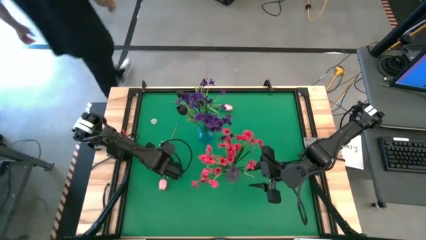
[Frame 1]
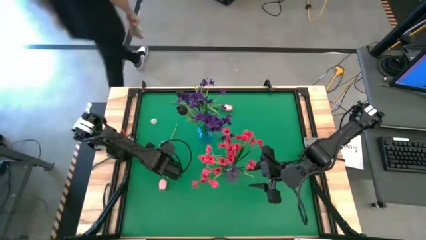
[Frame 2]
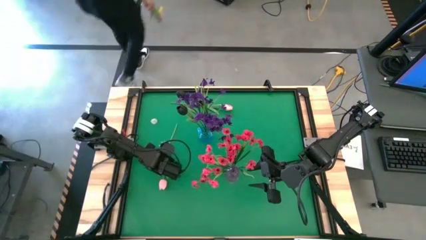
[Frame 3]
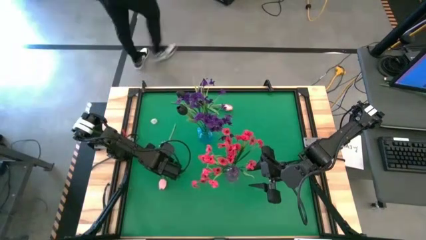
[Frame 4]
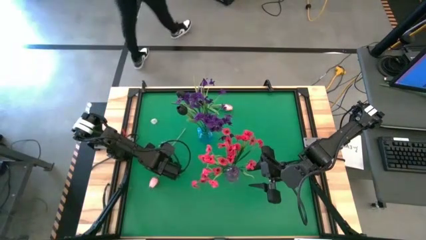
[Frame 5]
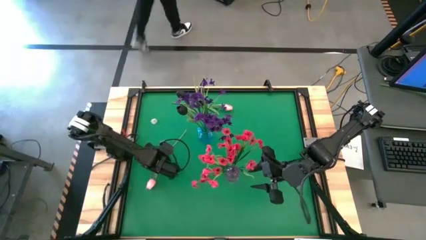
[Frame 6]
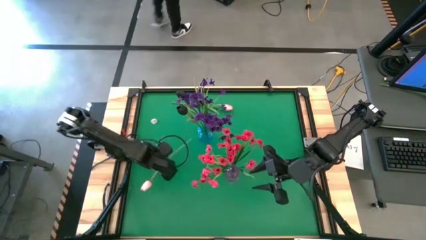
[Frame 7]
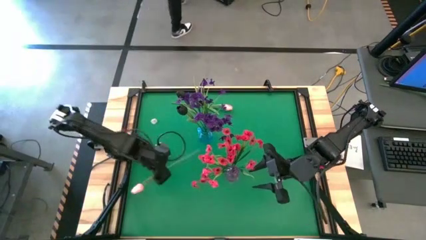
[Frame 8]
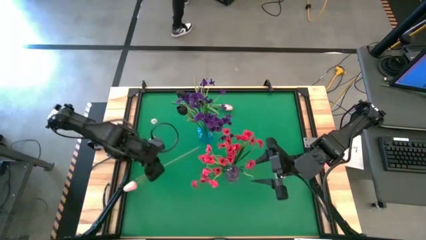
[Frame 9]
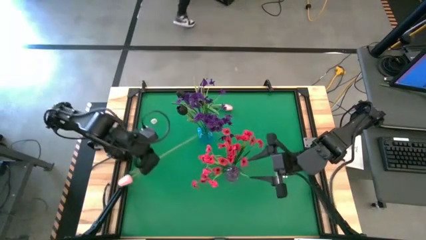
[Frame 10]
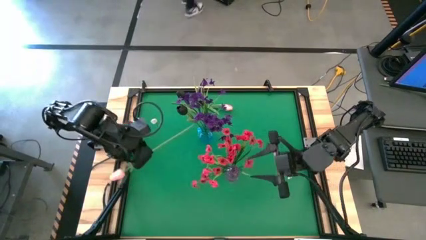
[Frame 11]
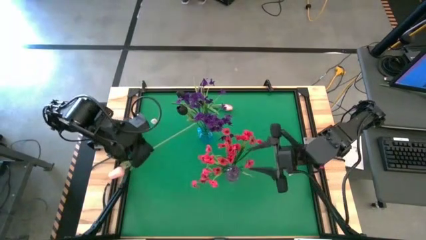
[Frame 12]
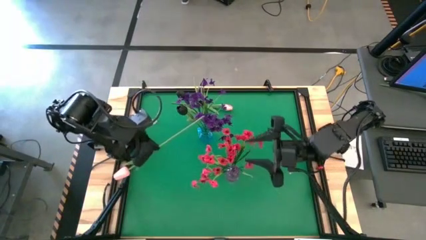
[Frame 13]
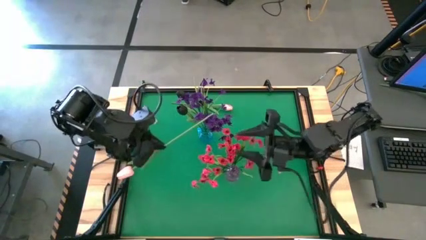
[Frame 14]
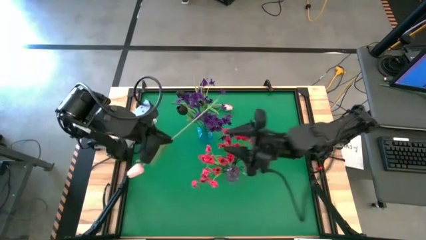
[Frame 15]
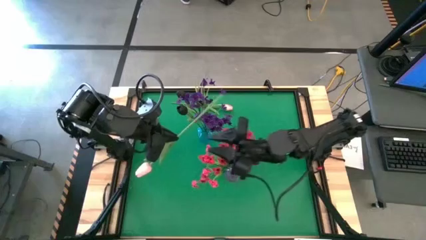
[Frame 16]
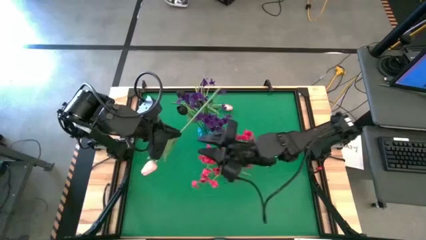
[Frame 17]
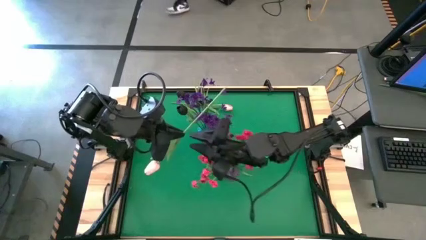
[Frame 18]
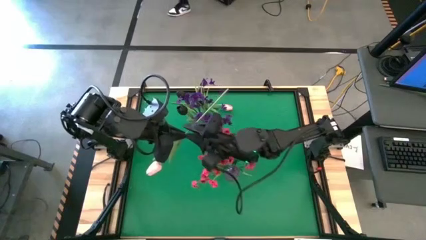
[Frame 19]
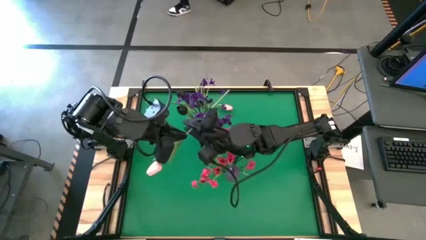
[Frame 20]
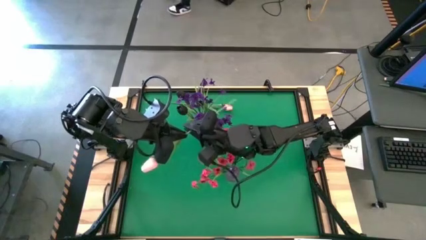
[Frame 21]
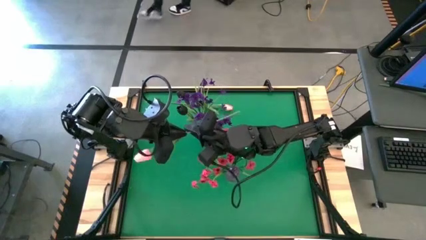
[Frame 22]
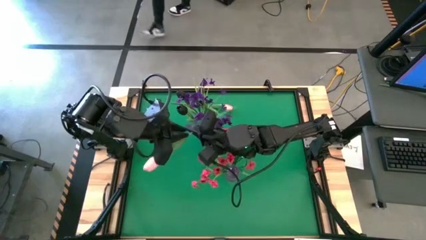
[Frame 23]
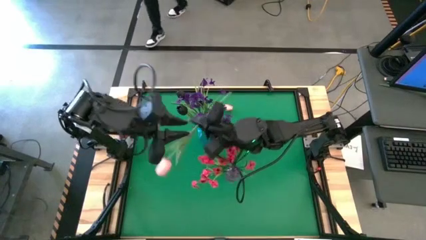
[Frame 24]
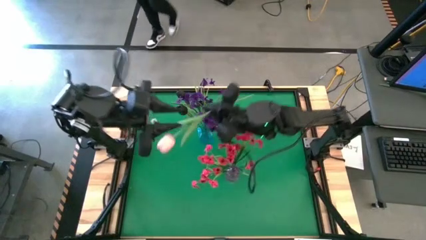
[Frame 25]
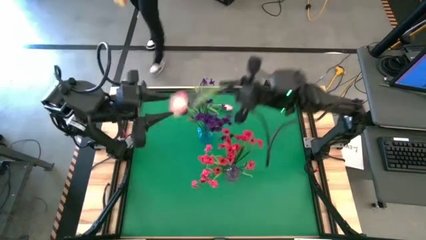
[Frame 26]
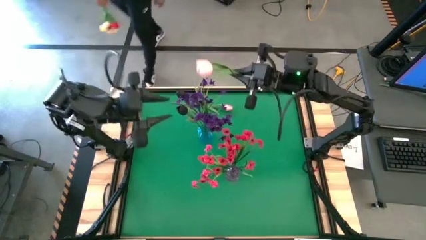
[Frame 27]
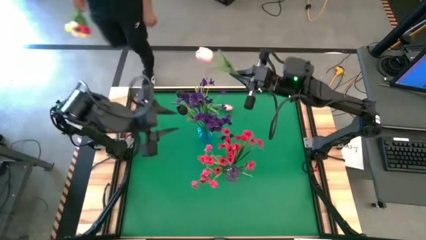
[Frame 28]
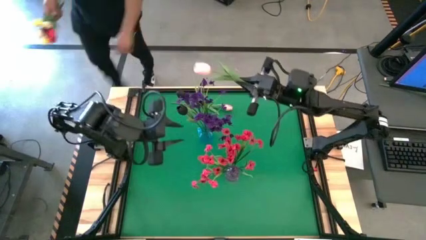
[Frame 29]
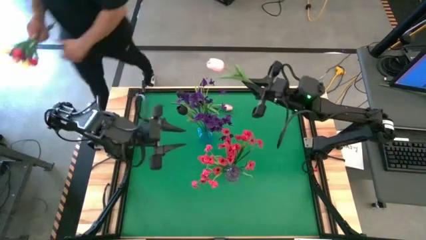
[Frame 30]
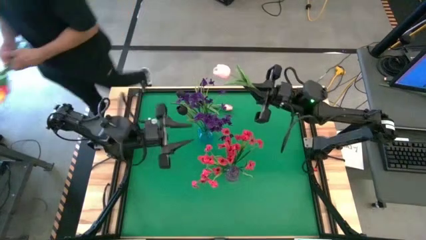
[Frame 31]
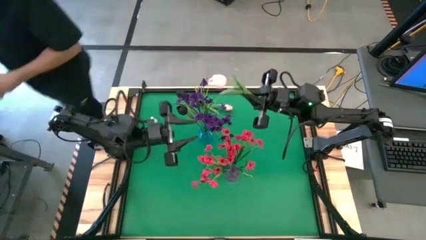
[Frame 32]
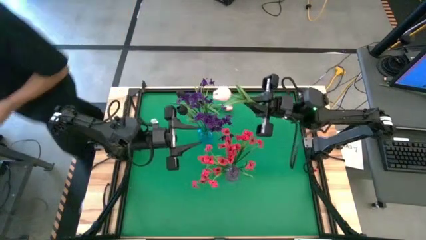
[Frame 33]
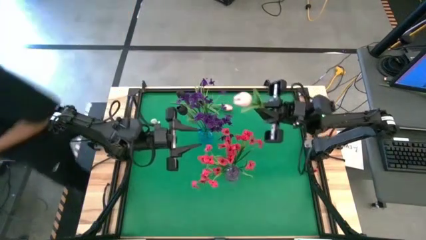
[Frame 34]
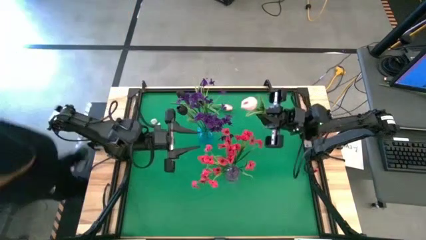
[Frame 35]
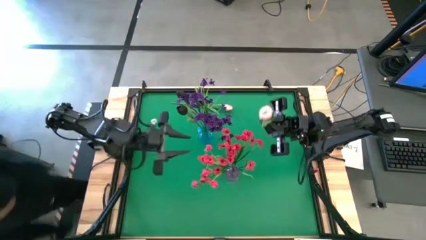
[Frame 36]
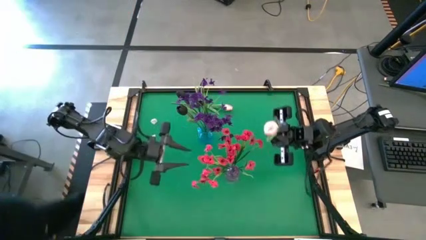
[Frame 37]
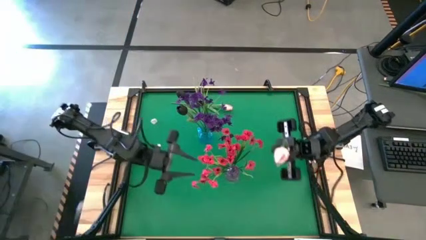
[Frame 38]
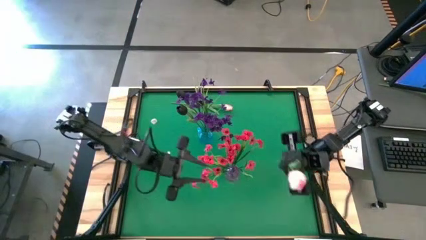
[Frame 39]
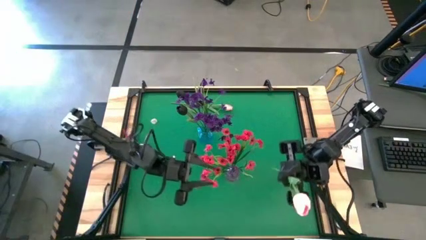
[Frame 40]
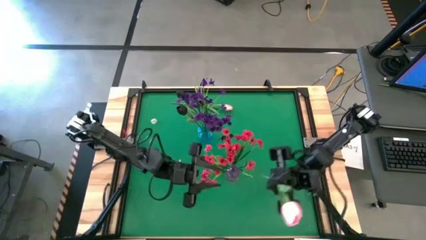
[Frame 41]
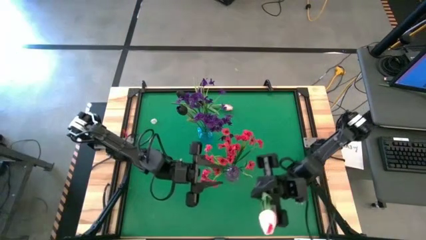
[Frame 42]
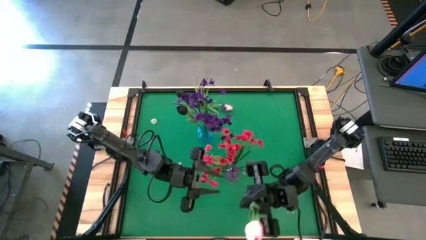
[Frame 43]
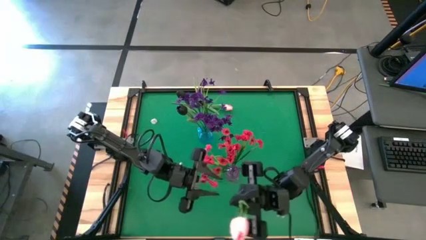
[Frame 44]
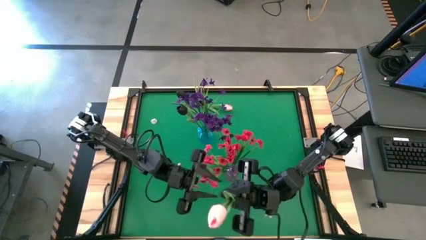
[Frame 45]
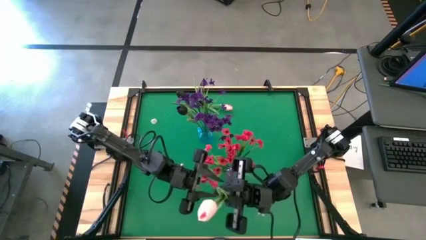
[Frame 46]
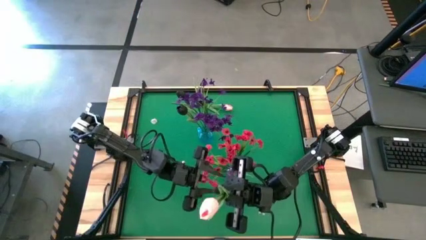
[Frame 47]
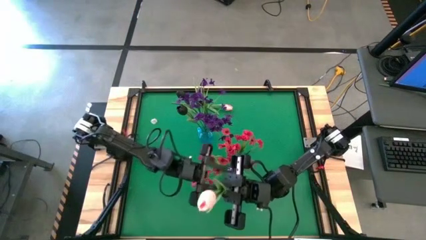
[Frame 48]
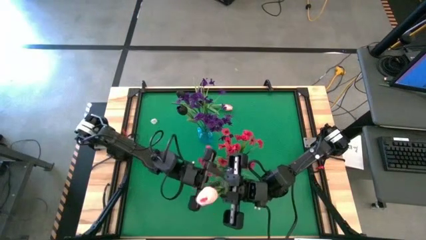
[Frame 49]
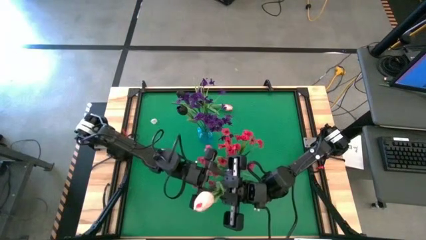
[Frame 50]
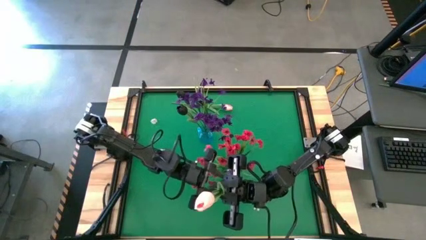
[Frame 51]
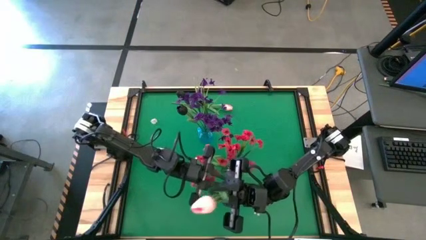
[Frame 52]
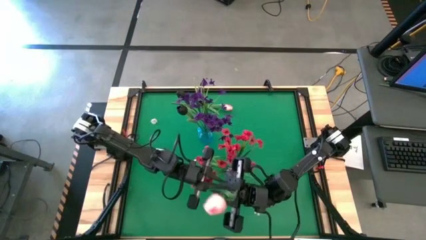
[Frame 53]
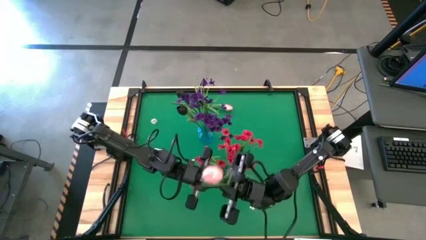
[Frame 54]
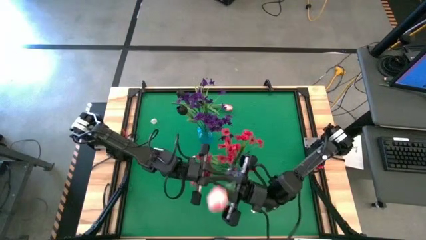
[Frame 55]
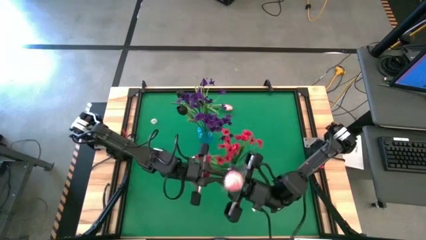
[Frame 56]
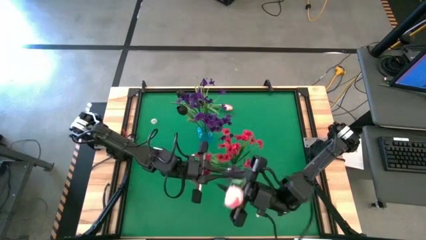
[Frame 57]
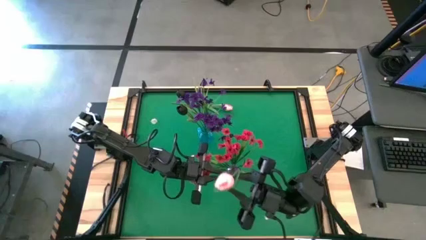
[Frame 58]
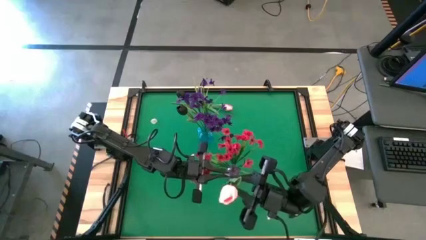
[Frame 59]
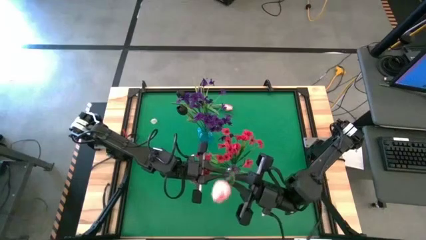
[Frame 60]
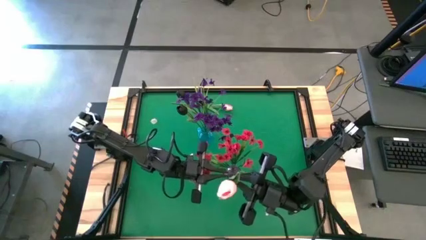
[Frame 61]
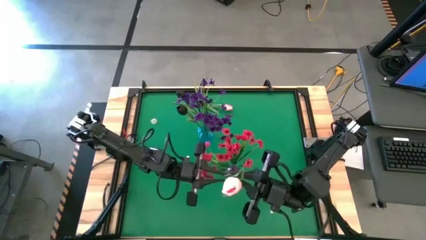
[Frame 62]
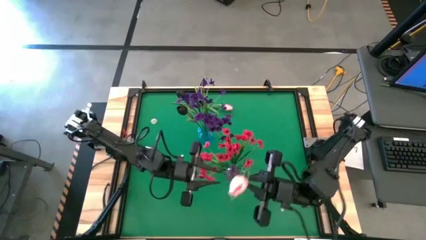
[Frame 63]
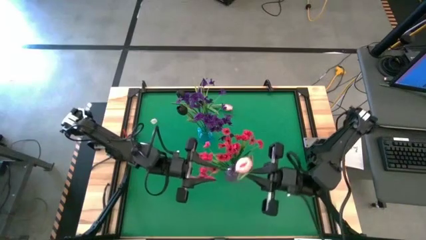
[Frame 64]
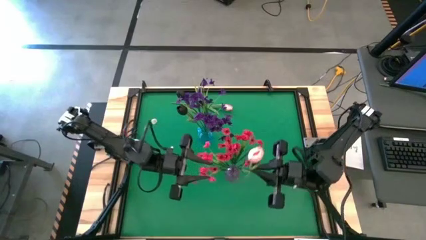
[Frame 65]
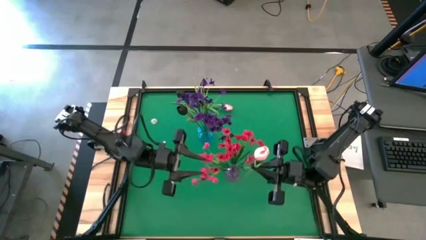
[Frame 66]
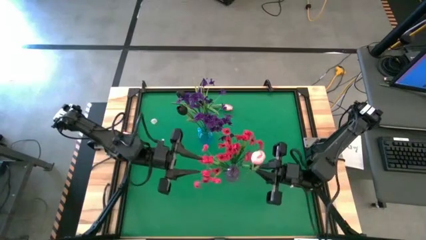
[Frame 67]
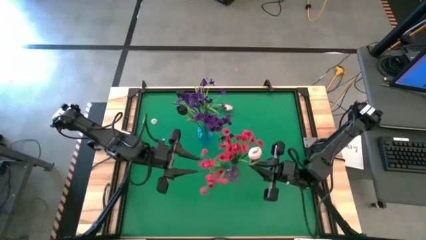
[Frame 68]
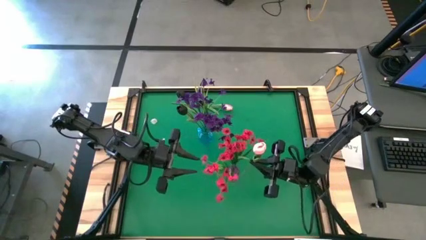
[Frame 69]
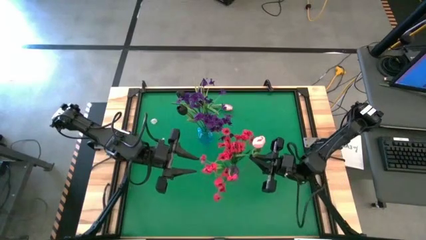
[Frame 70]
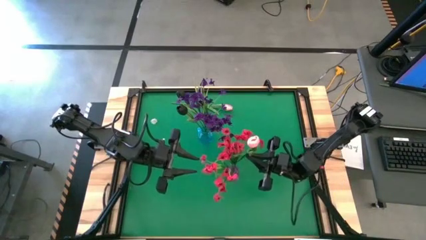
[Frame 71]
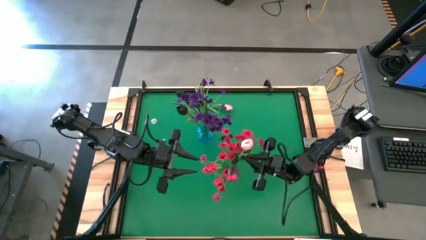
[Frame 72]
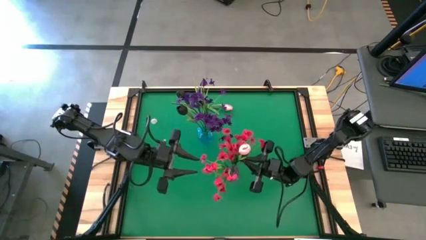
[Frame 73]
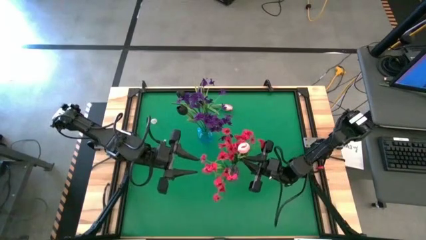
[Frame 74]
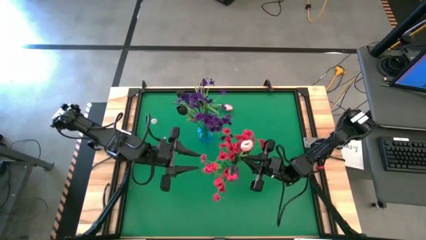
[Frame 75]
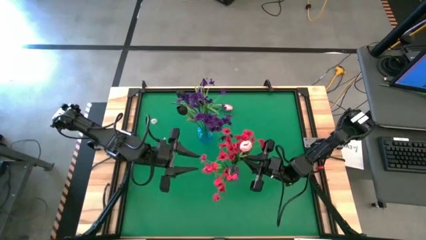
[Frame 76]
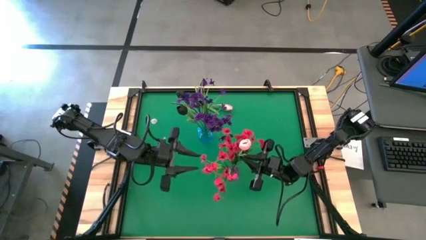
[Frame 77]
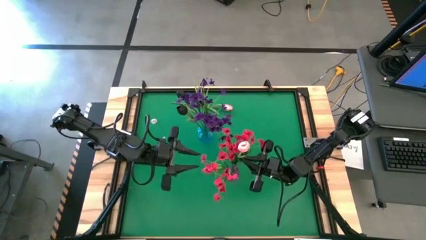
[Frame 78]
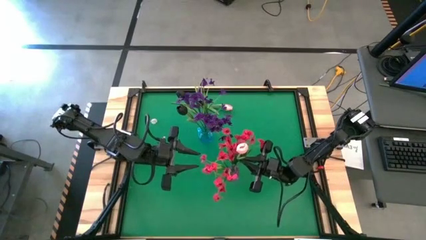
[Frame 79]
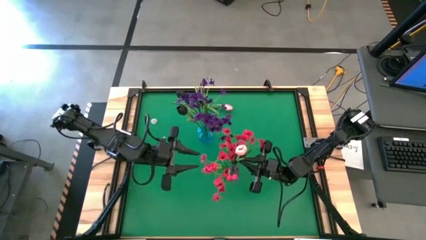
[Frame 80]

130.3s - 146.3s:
Task: Sort flowers into vase by color
Put the bottom pink tulip into the purple vase

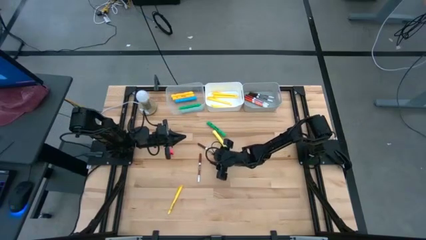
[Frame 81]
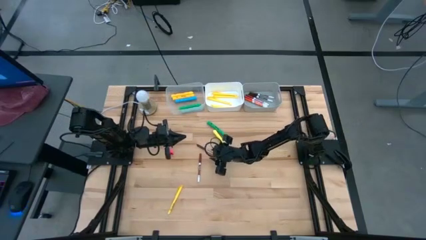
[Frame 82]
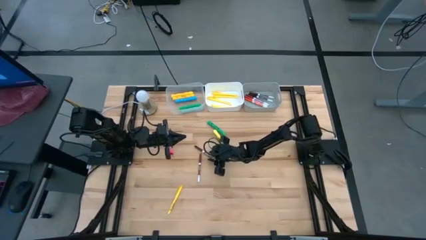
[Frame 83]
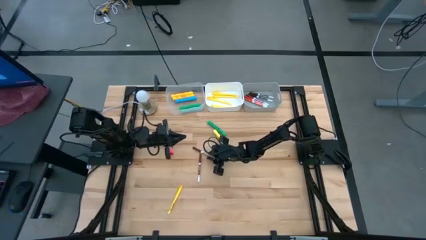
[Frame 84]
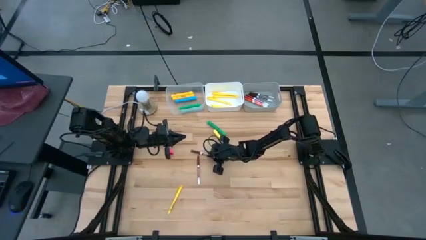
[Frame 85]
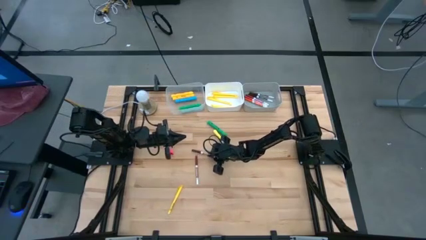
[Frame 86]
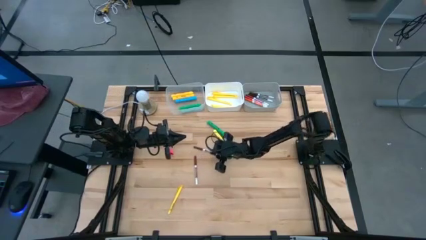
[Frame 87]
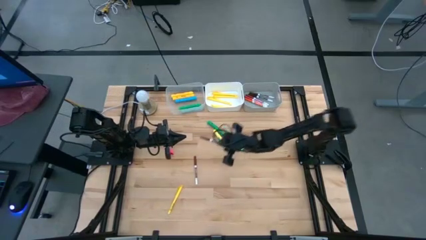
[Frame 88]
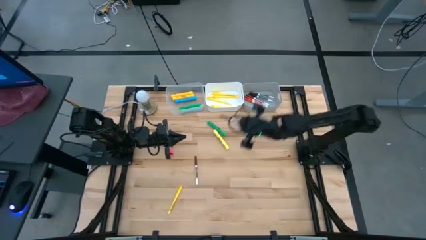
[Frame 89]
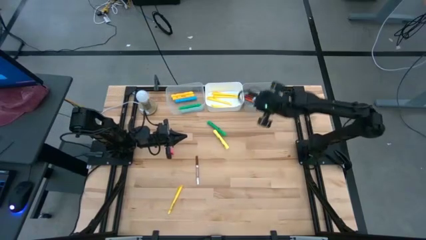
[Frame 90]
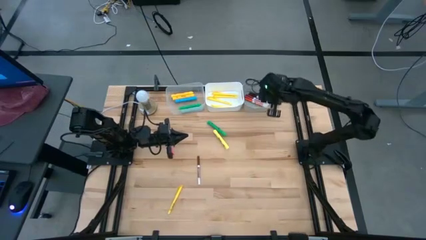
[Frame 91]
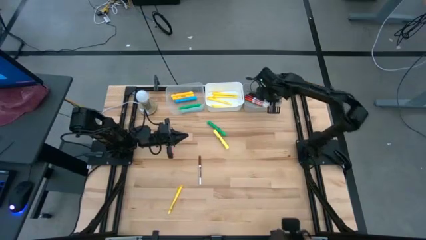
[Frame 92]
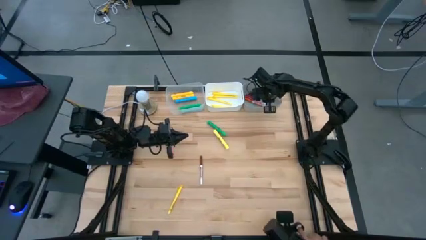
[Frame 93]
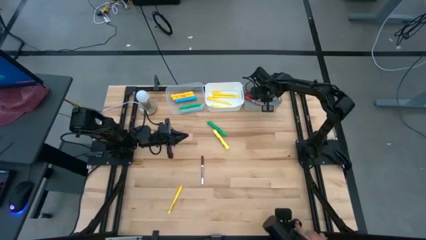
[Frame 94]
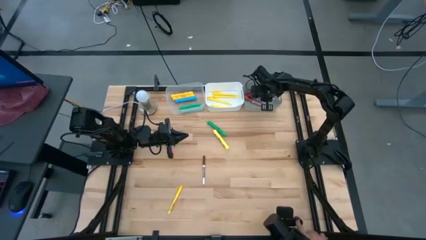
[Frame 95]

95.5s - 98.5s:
Task: Pick & Place Markers
Put the dark brown marker pen into the gray bin
